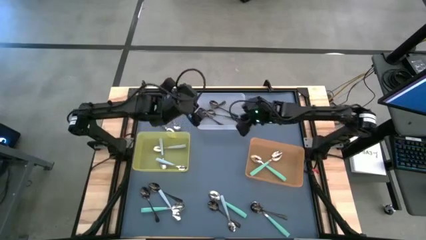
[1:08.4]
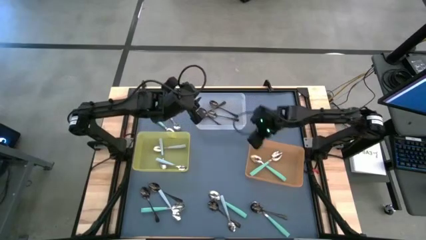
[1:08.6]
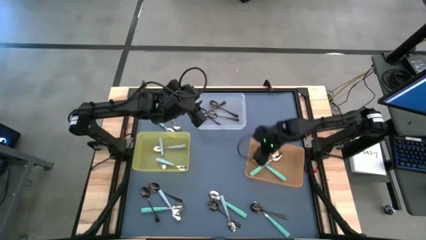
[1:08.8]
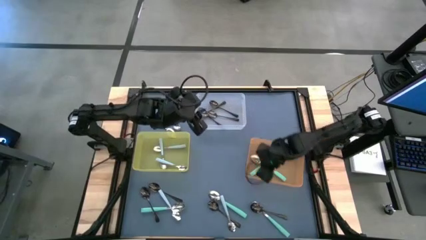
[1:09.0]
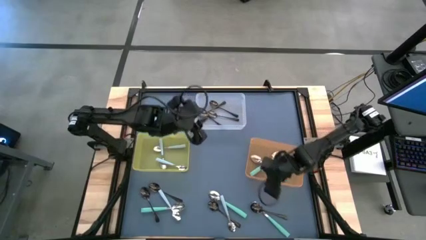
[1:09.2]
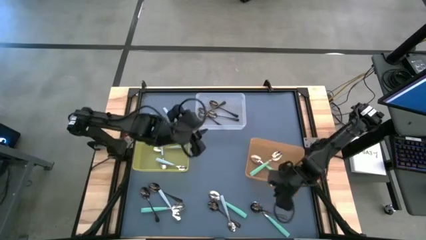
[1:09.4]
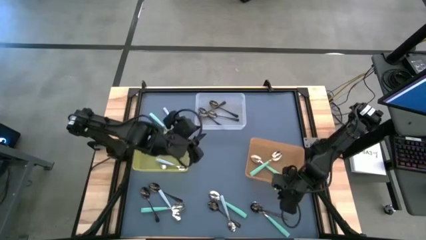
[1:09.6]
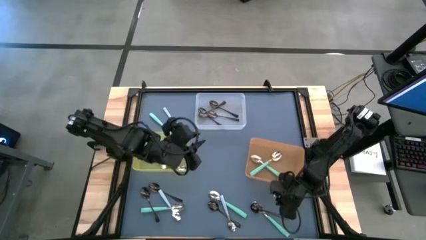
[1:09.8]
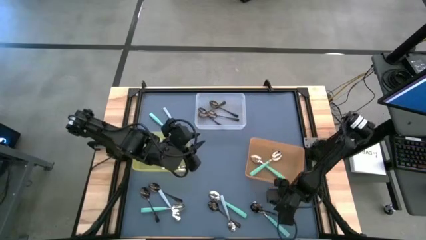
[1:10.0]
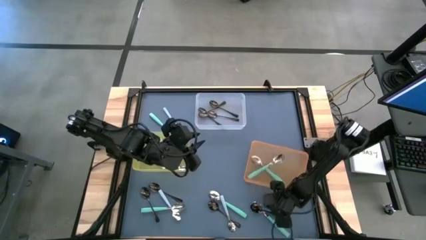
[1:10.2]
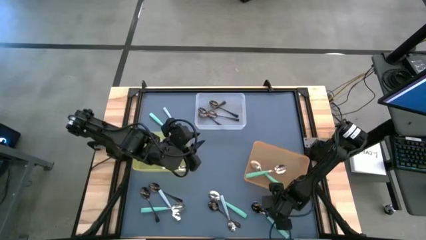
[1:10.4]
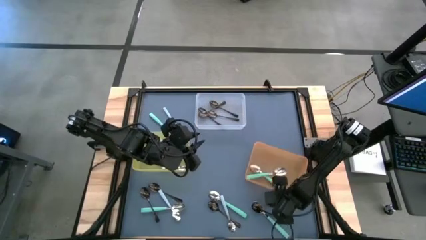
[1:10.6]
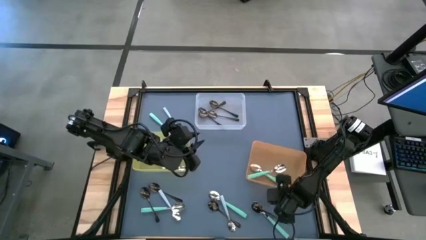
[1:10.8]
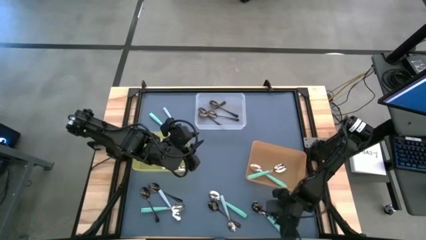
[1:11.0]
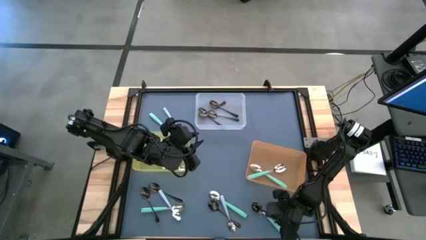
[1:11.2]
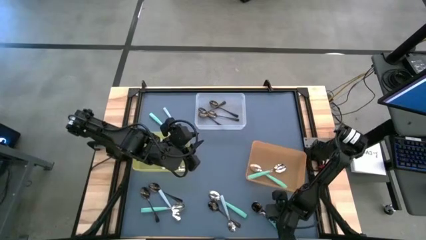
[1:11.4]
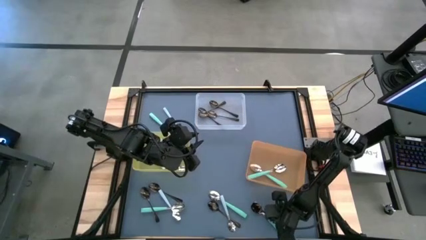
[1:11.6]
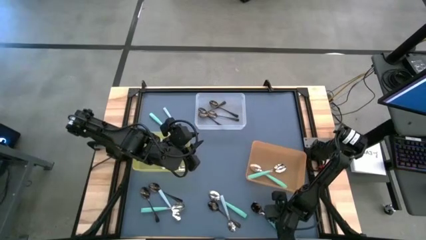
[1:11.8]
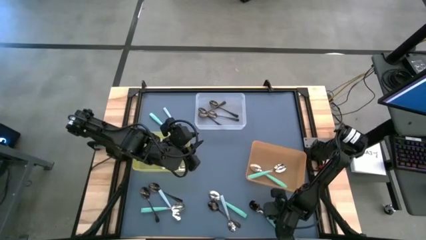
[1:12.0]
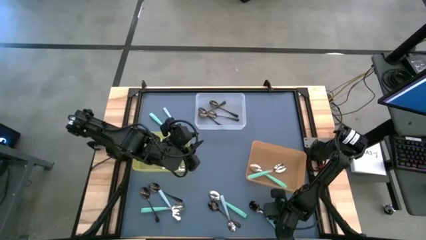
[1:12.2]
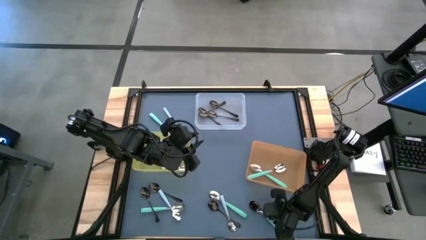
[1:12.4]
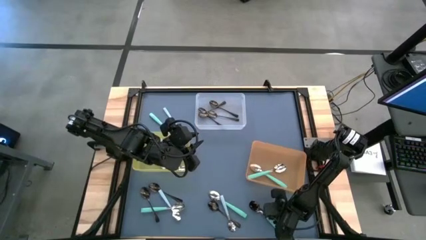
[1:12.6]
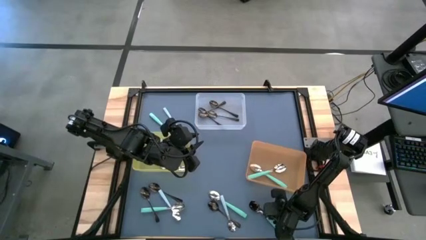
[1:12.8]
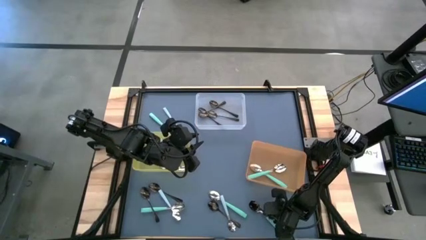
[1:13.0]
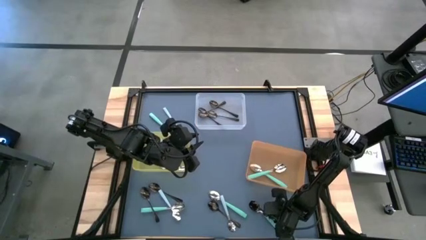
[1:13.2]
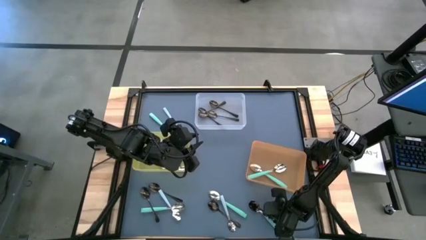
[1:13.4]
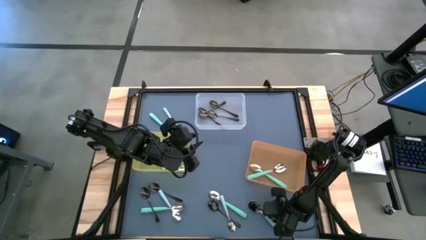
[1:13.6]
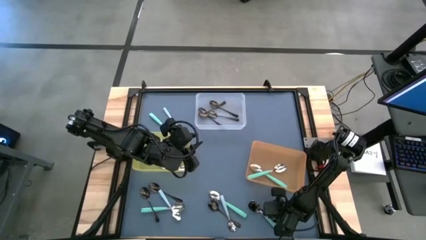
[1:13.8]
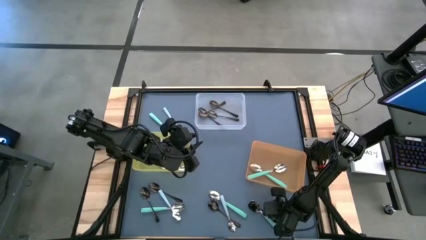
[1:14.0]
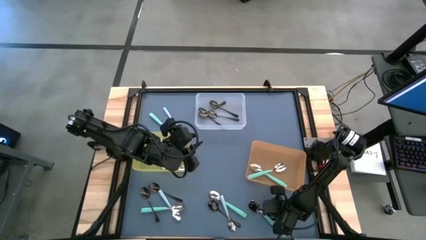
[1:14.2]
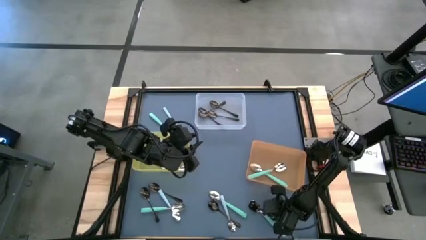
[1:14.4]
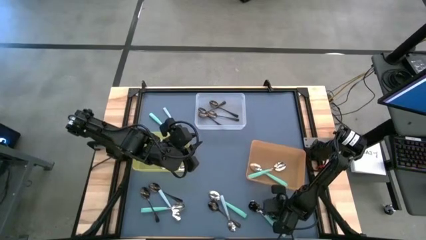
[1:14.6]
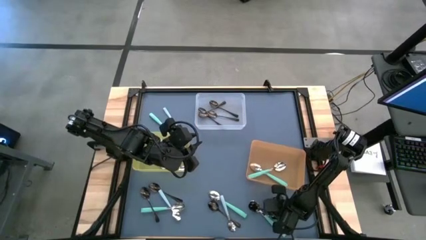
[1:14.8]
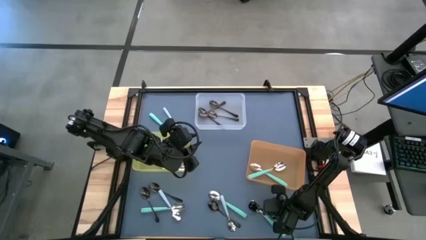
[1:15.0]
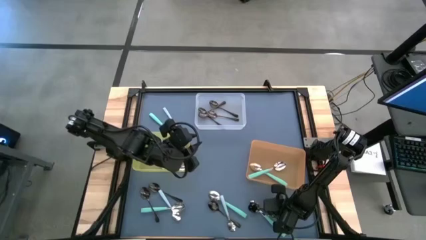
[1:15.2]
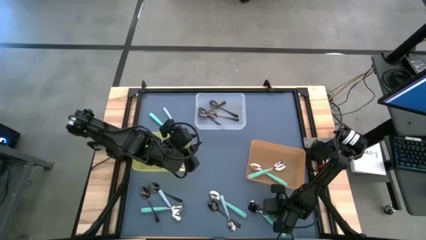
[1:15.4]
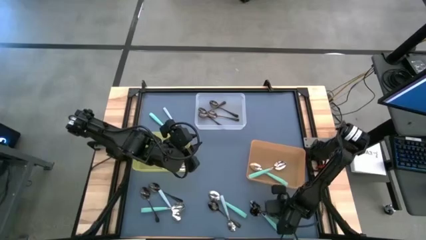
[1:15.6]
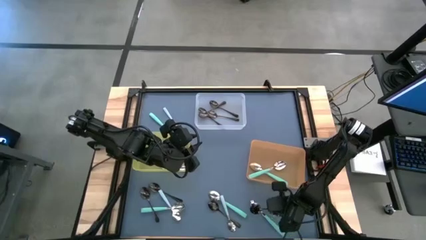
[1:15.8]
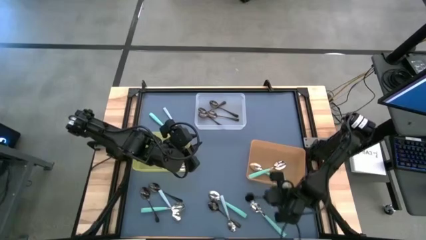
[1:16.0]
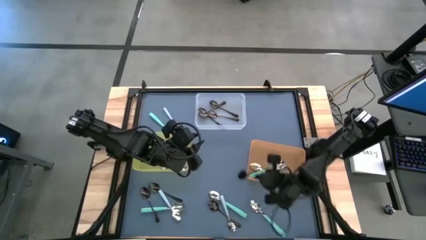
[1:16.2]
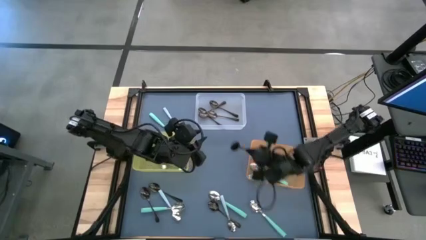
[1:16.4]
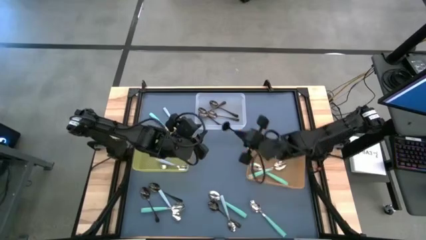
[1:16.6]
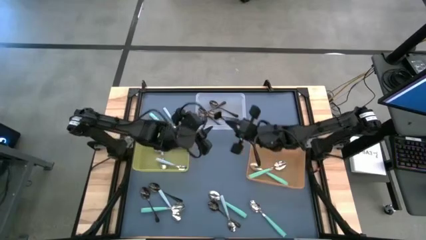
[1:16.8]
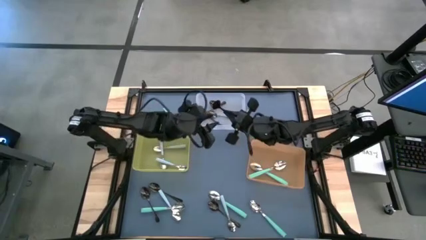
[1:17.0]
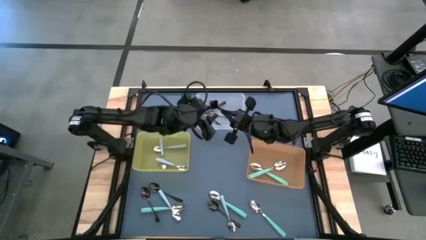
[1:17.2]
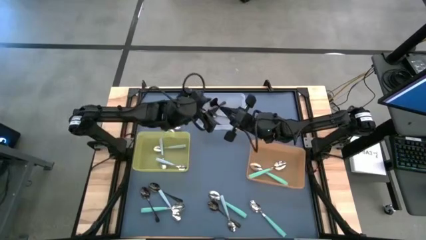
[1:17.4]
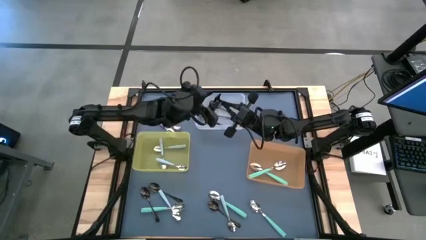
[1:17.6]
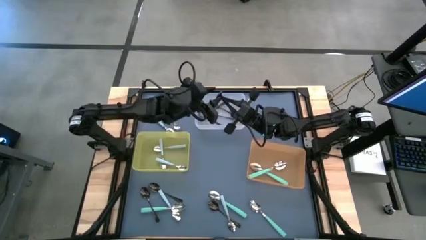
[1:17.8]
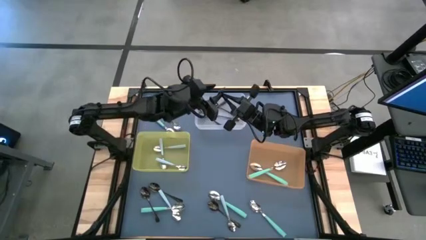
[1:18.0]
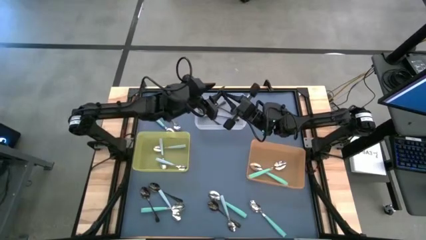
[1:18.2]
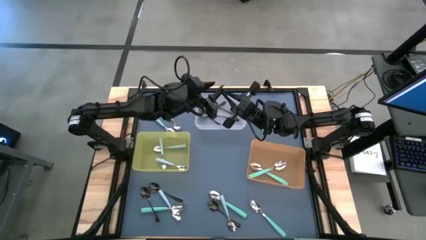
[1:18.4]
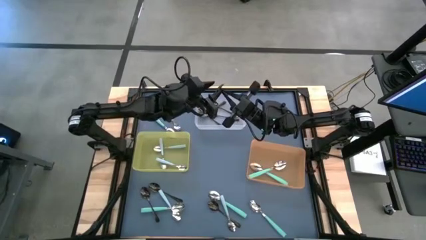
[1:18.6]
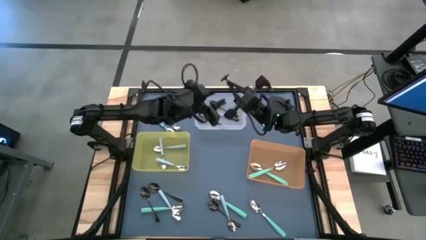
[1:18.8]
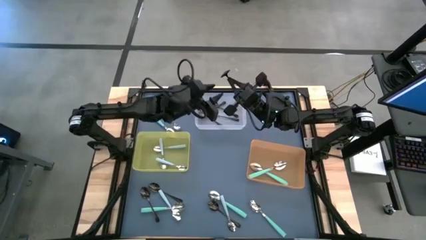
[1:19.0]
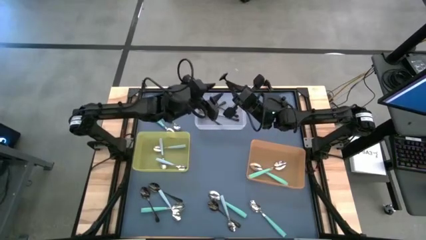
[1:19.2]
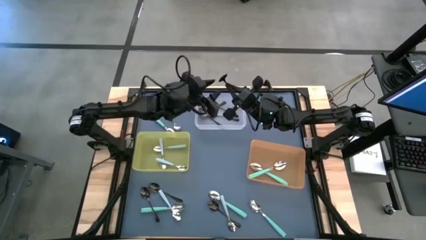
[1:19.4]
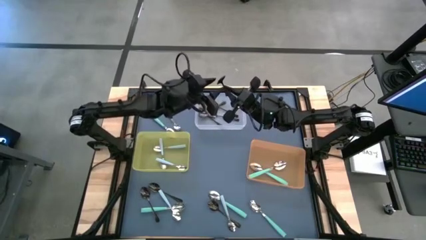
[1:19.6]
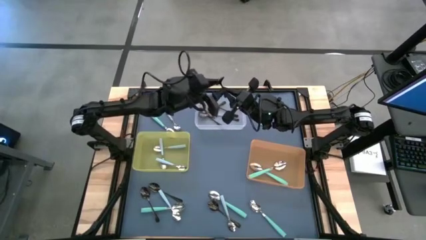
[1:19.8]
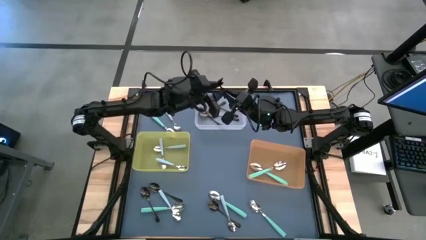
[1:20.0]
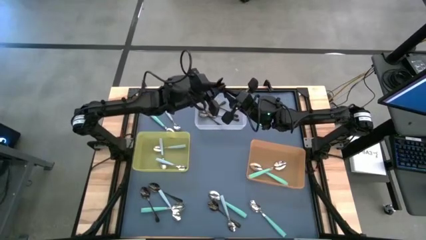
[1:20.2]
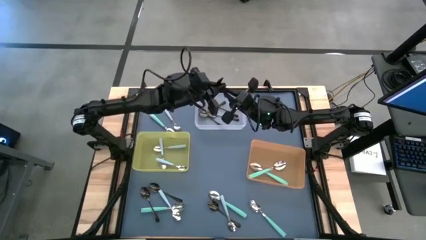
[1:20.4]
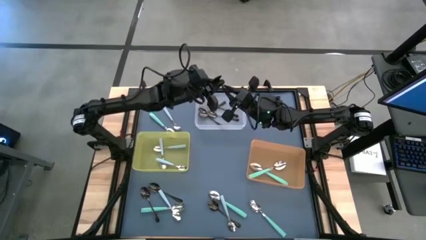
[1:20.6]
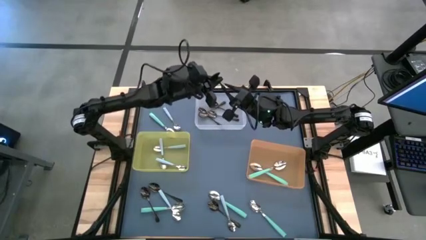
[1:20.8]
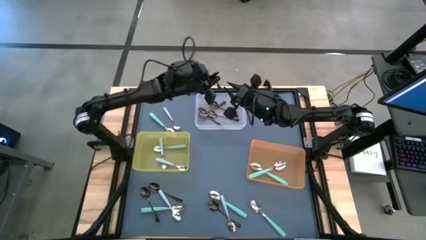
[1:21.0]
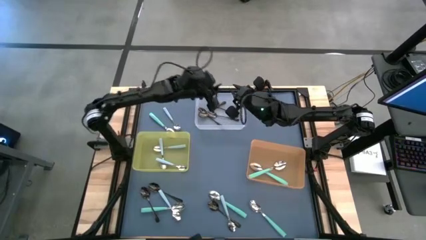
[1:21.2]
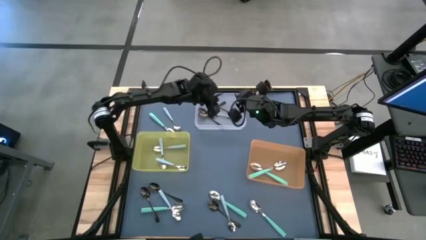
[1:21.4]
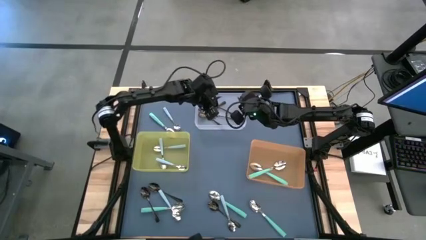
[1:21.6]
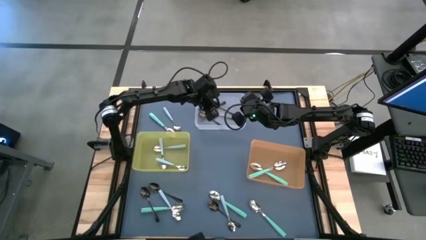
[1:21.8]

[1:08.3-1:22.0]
Task: Sort silverware by color (type)
Put the black spoon into the transparent bin

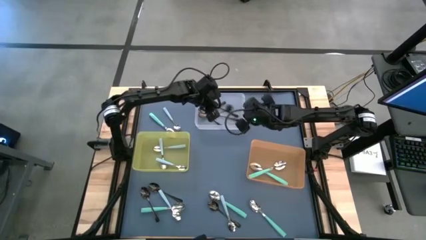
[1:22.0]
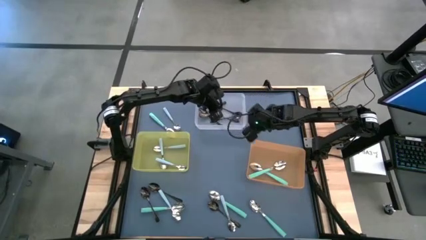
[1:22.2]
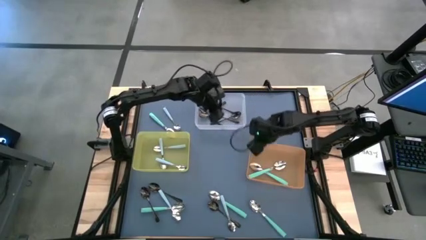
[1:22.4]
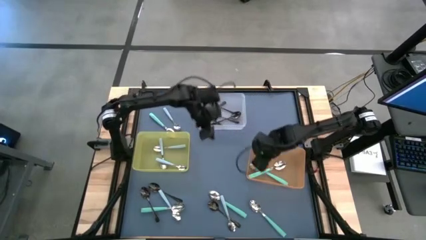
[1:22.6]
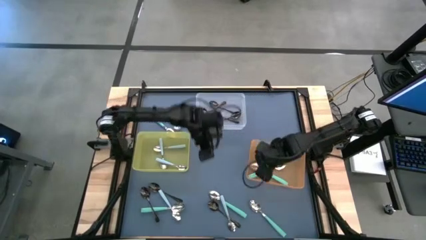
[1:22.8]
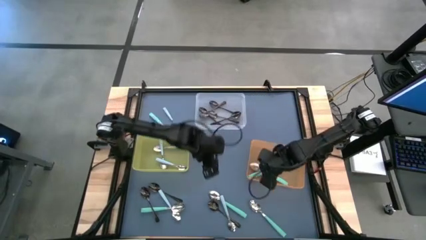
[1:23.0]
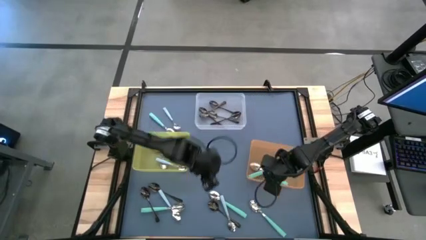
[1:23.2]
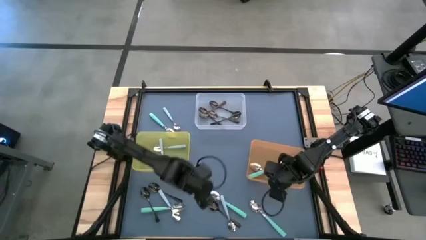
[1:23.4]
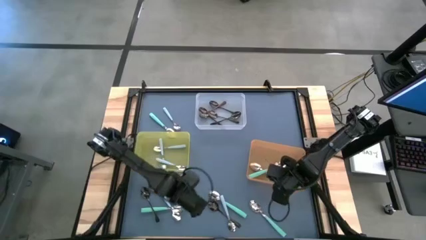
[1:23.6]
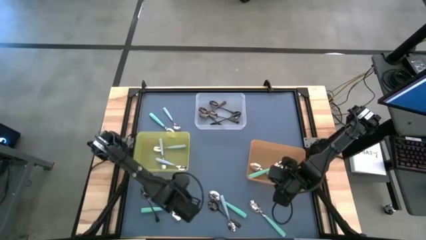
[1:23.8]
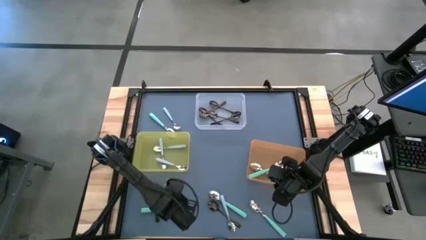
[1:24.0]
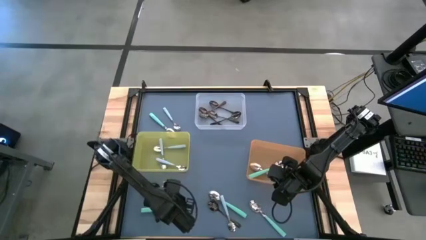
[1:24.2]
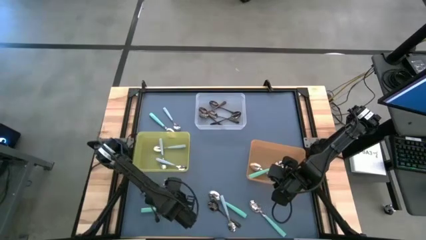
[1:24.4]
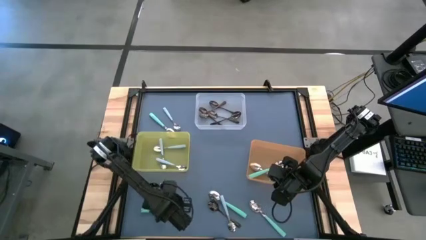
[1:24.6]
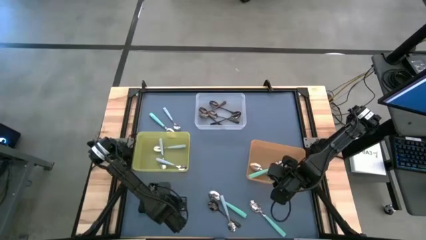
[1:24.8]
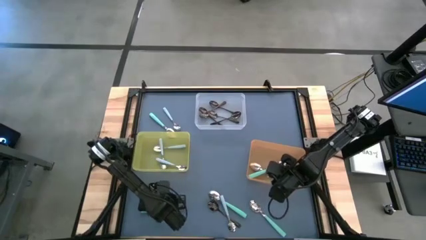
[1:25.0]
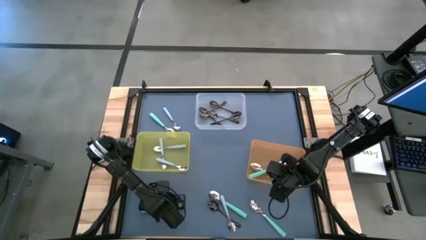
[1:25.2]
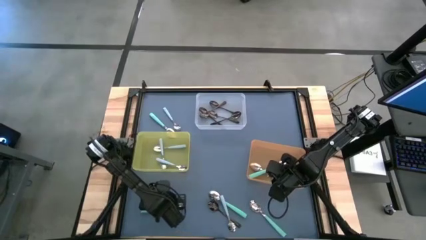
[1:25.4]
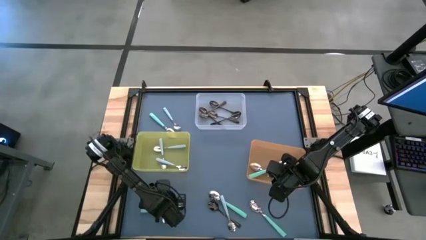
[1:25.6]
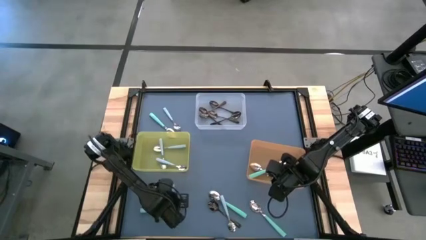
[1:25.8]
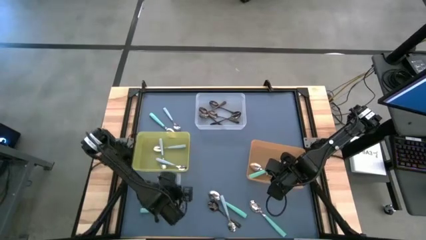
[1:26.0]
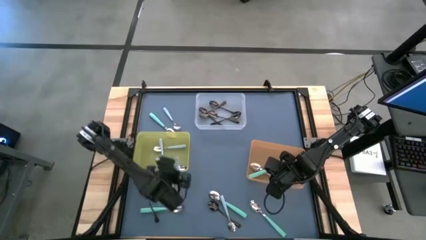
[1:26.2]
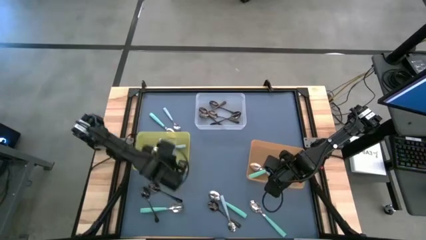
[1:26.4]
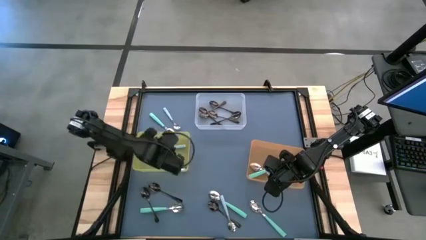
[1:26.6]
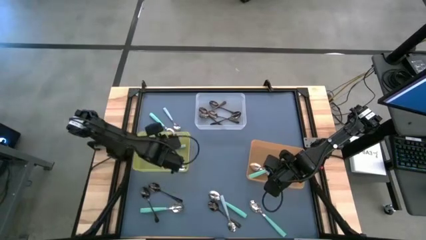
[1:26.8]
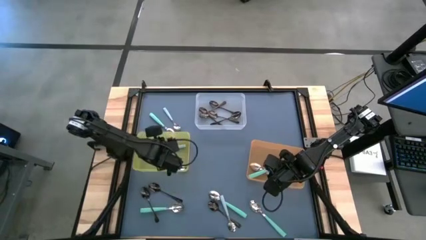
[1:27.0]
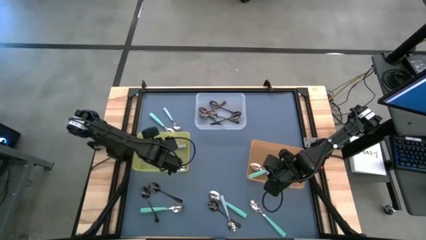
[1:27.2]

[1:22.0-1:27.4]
Put the blue spoon into the yellow bin
